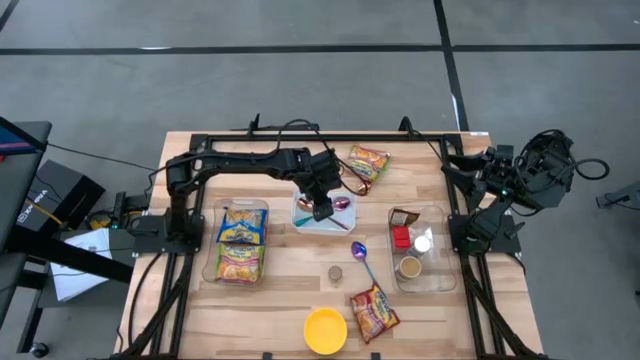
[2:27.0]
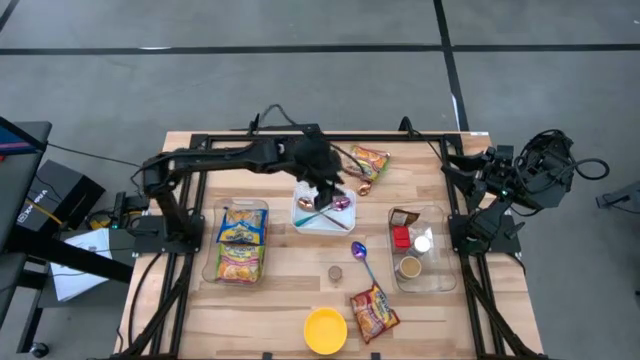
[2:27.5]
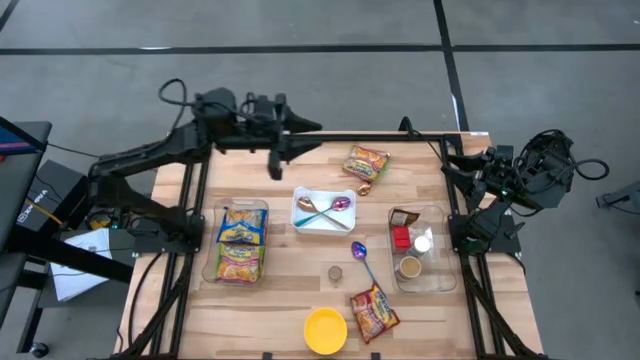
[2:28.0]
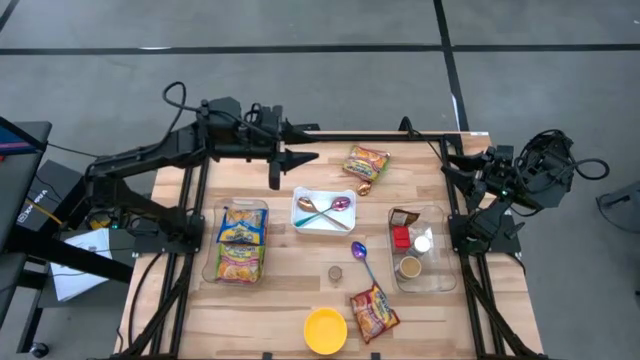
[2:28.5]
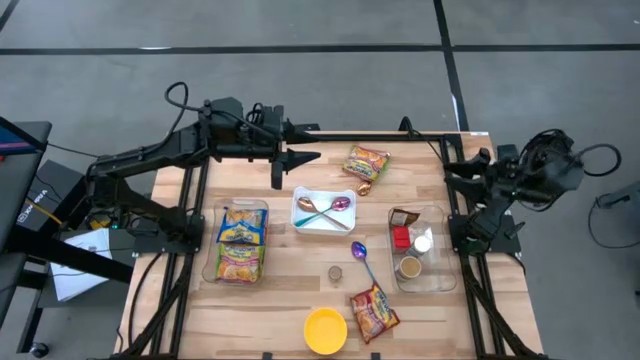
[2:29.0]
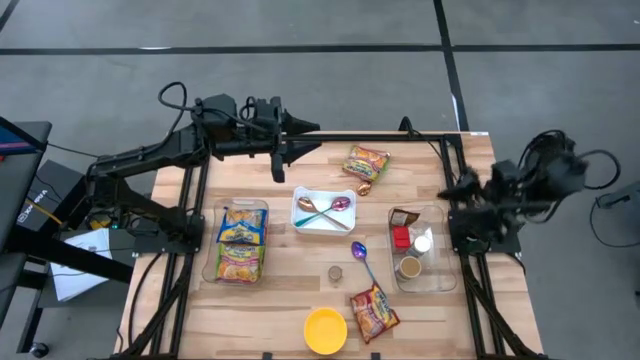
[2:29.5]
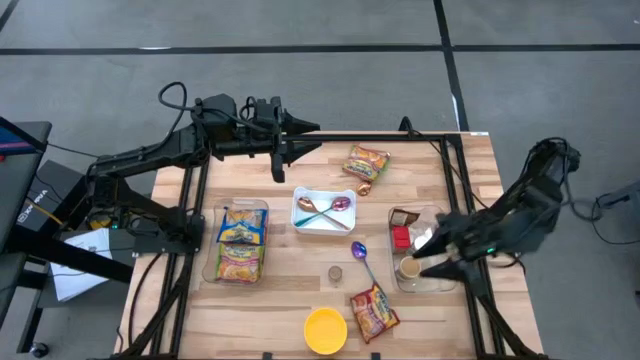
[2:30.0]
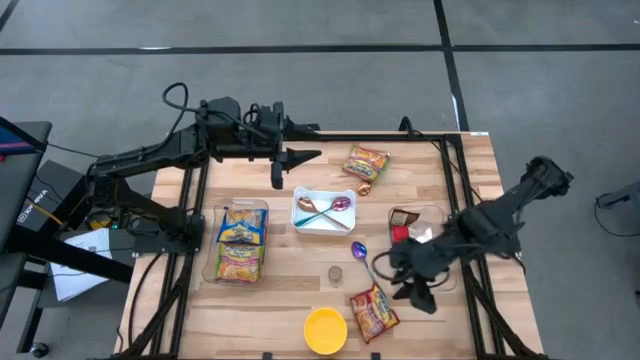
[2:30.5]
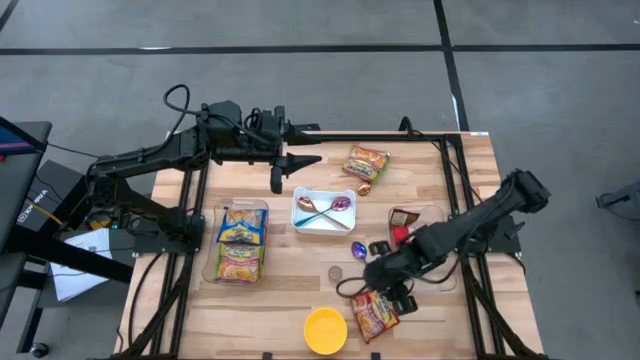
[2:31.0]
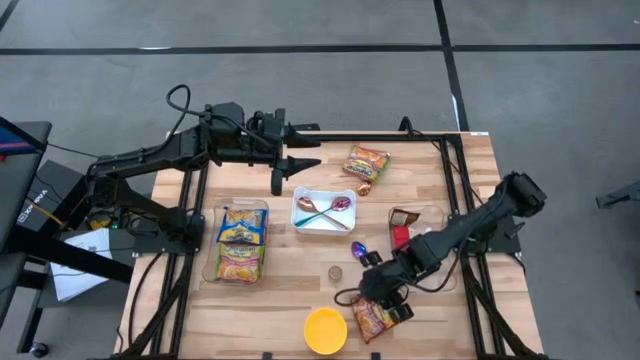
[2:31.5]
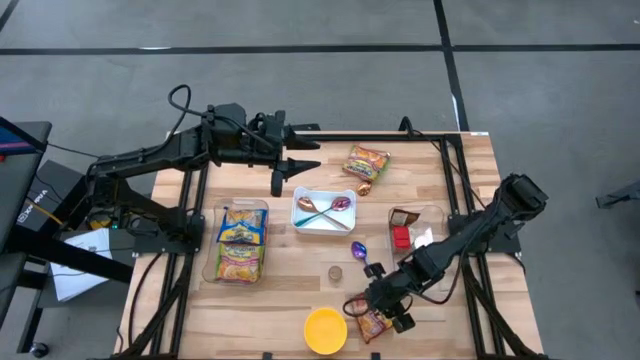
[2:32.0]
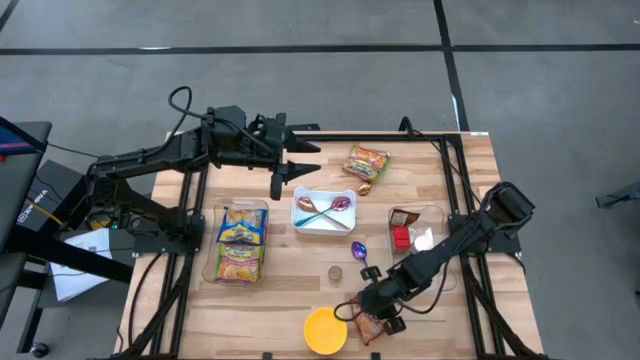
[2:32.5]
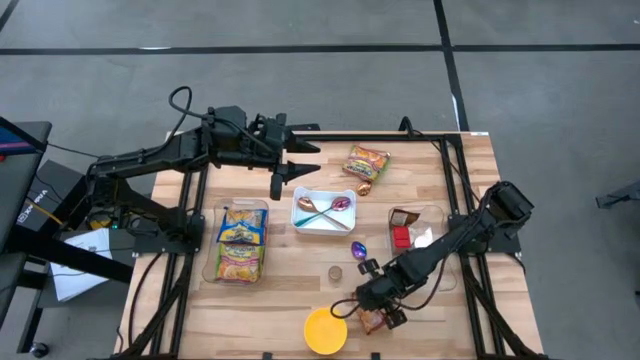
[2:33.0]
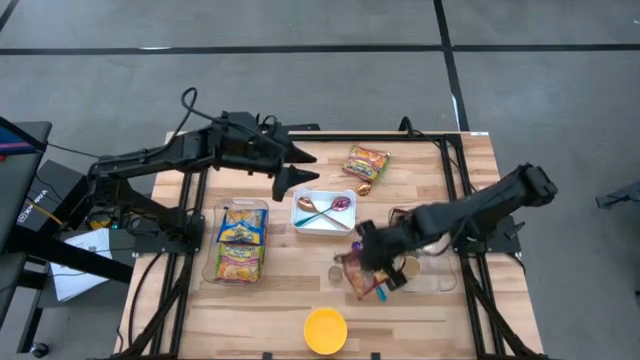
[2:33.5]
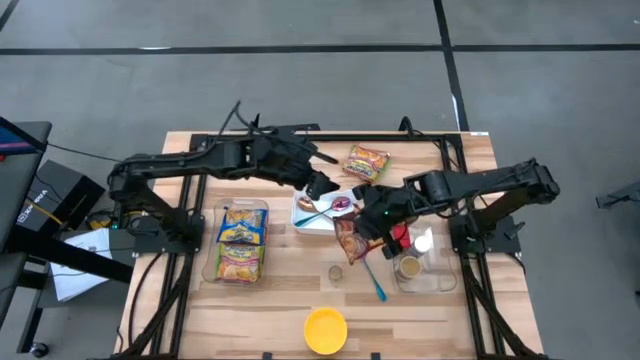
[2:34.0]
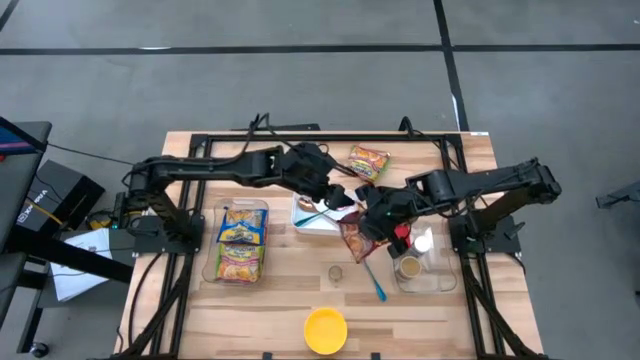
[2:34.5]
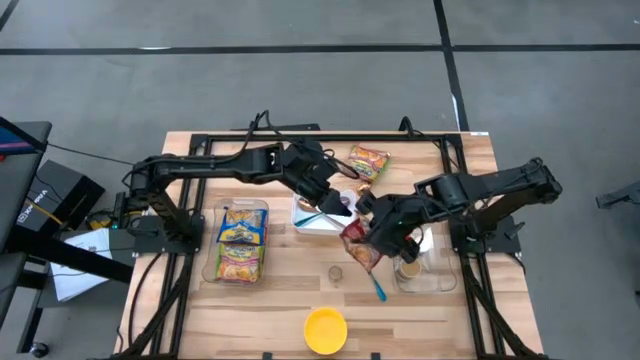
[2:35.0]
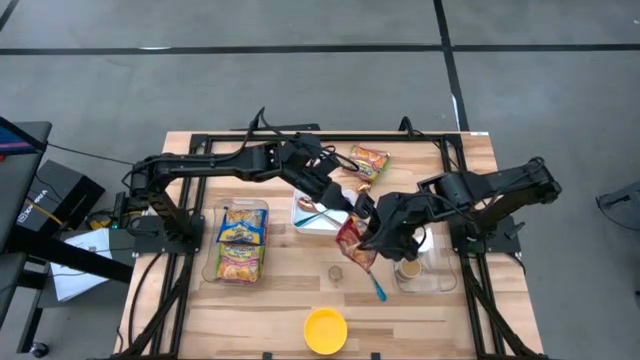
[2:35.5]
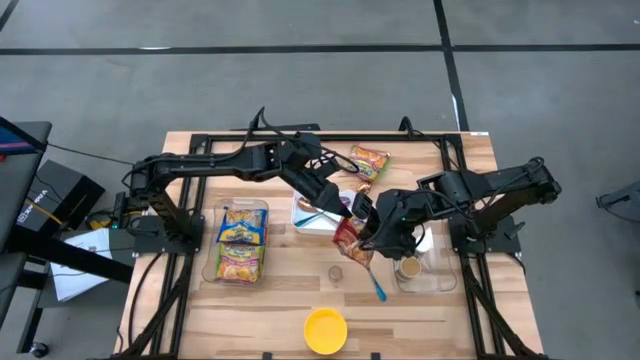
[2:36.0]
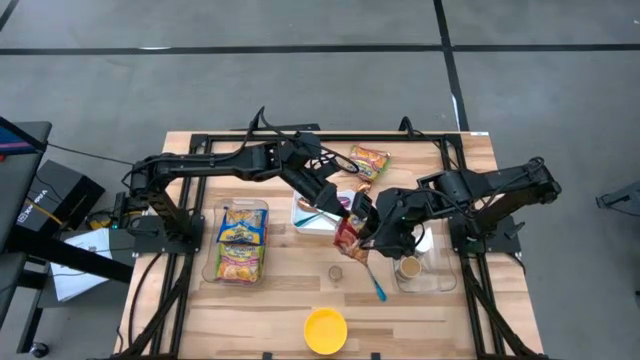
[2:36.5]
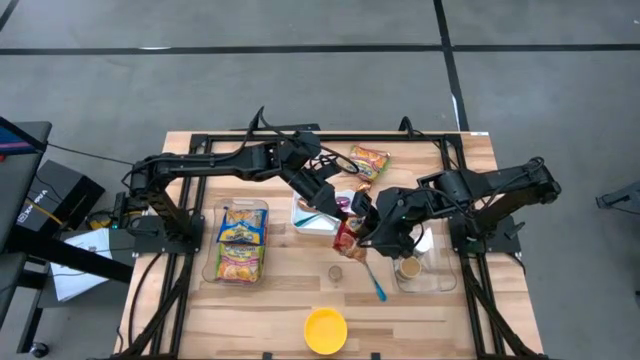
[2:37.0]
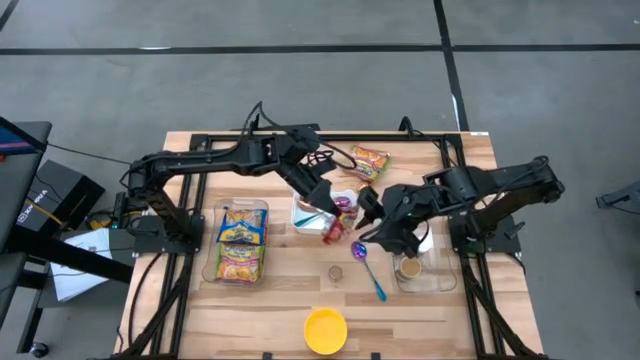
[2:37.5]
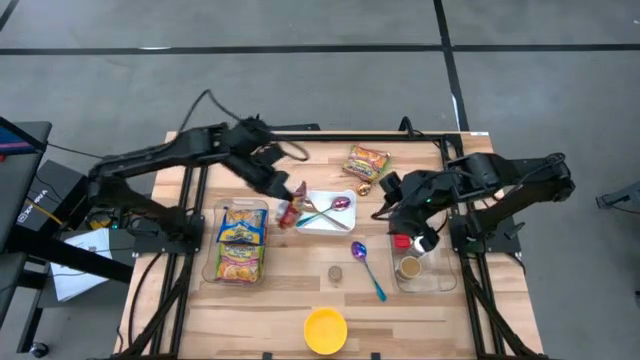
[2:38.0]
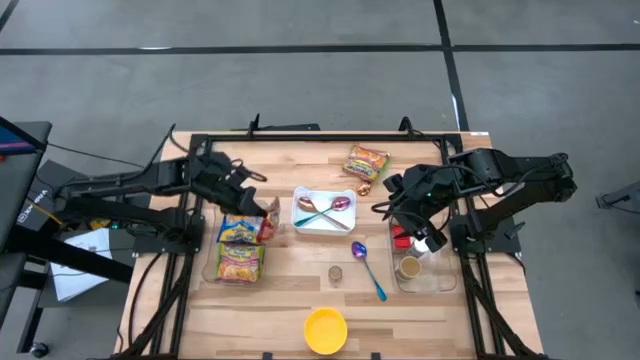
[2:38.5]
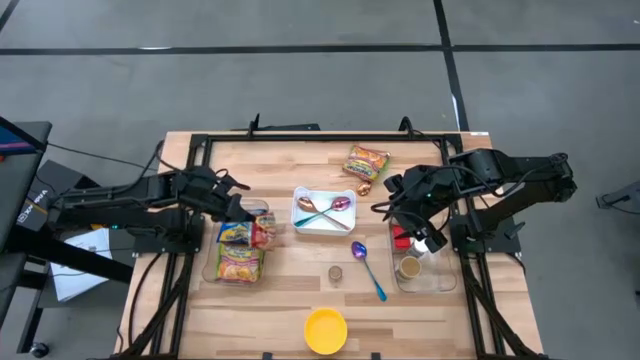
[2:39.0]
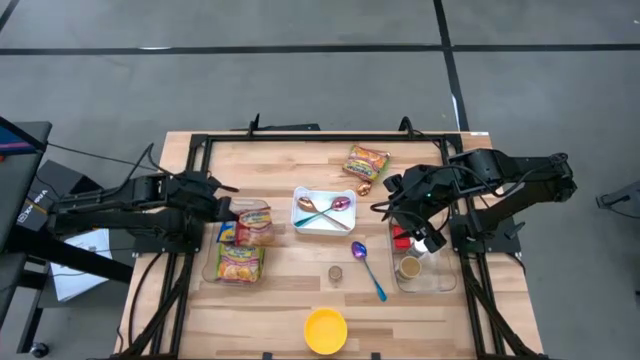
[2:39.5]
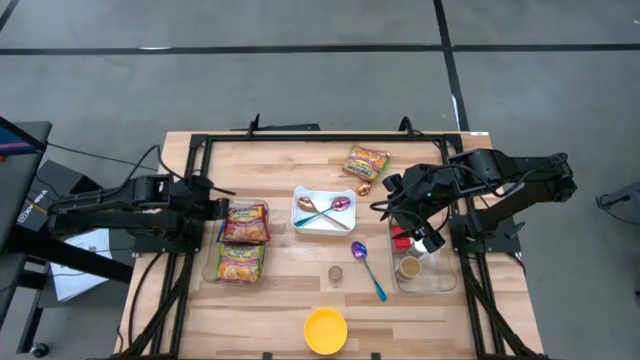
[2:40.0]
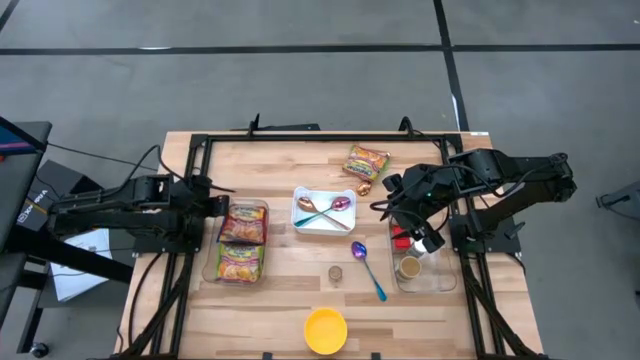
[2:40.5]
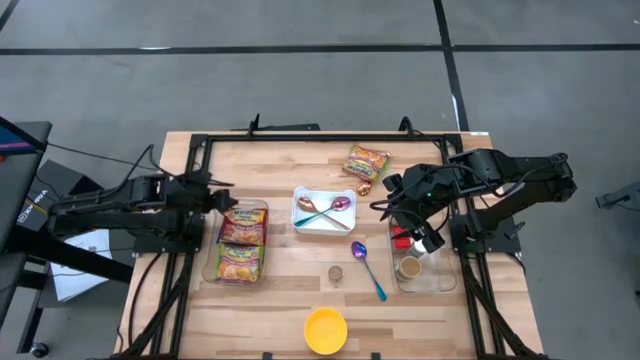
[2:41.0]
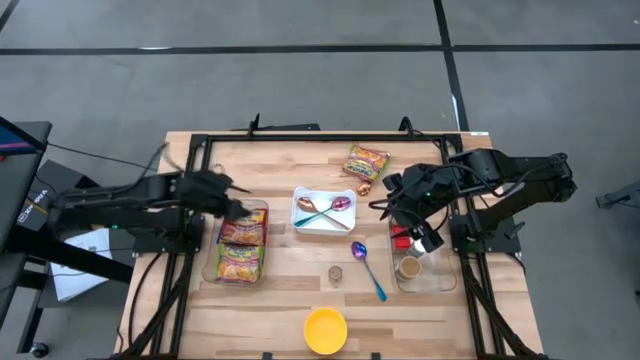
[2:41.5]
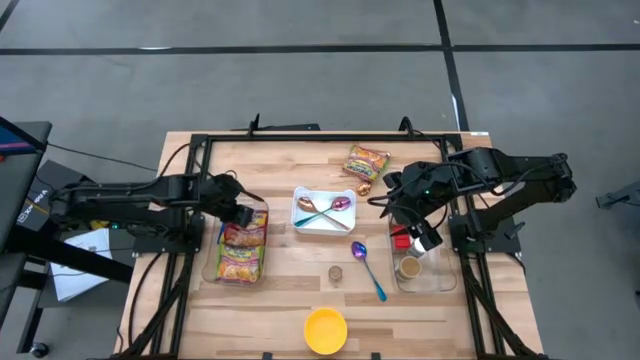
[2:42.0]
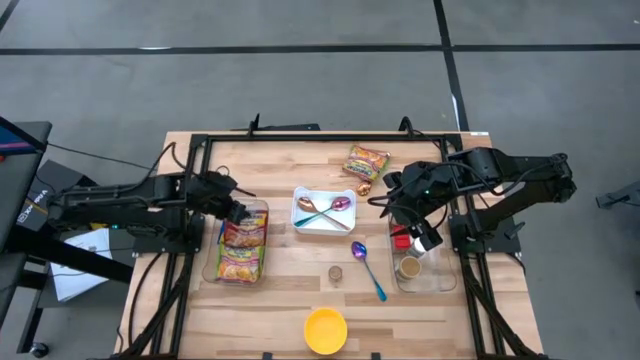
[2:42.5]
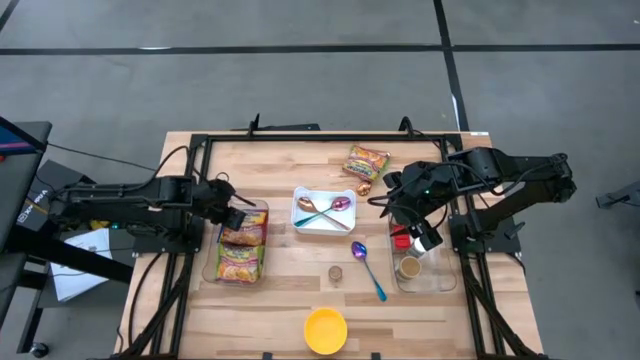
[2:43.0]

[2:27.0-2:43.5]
Task: Pick & Place Food Item
Put the red noodle pack into the left transparent bin

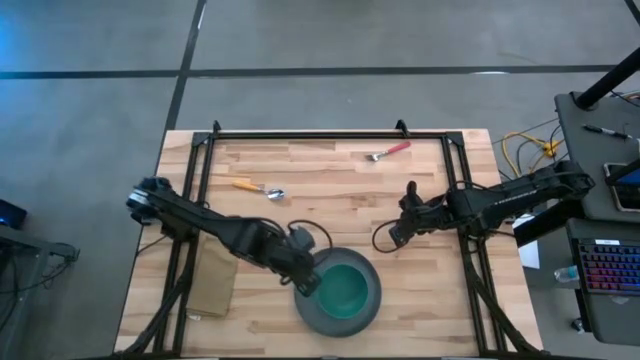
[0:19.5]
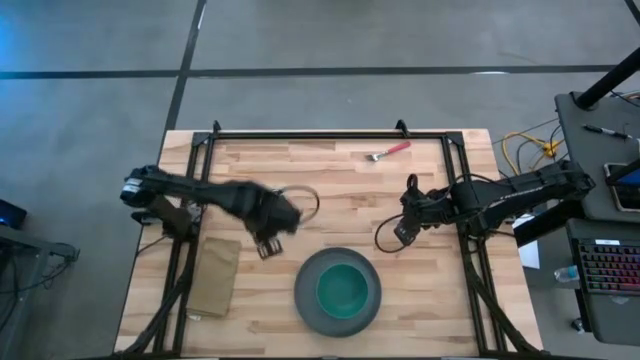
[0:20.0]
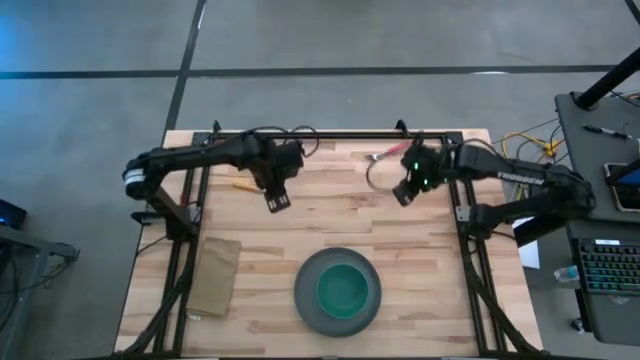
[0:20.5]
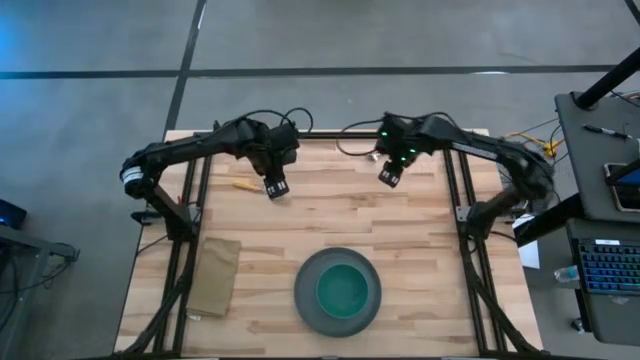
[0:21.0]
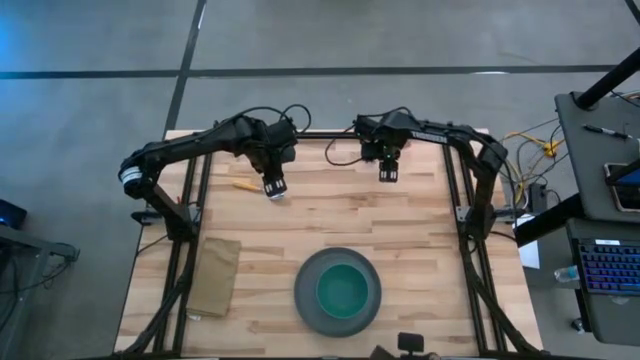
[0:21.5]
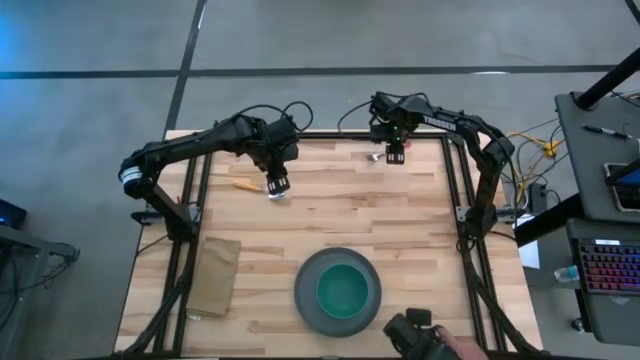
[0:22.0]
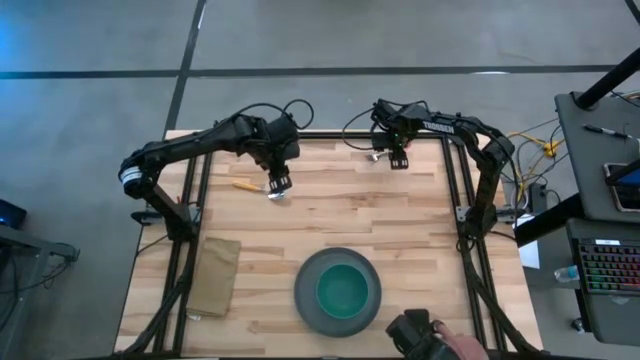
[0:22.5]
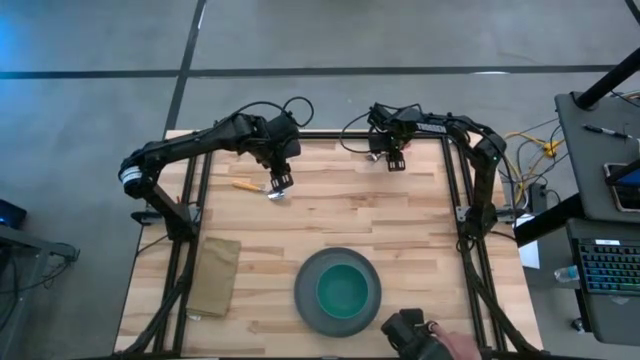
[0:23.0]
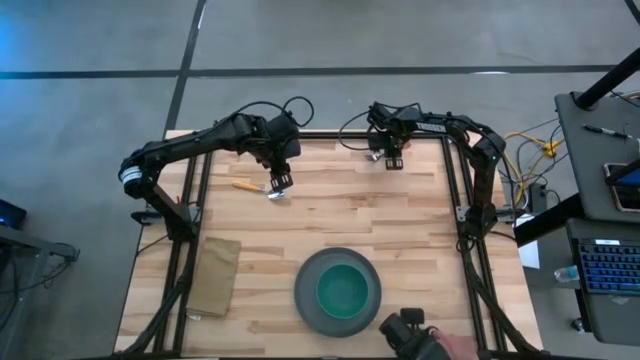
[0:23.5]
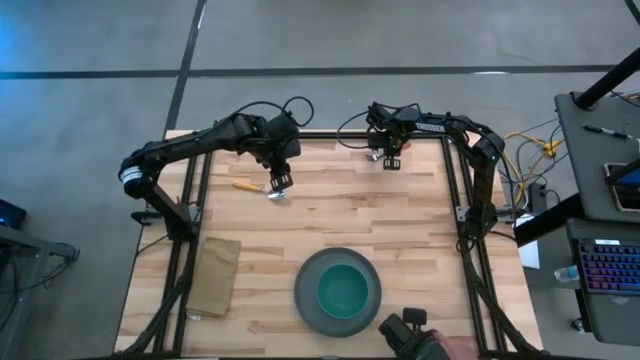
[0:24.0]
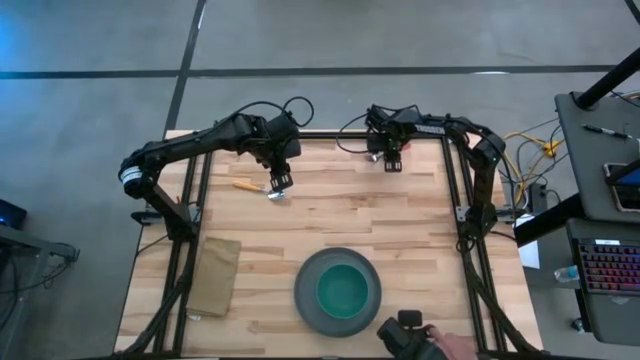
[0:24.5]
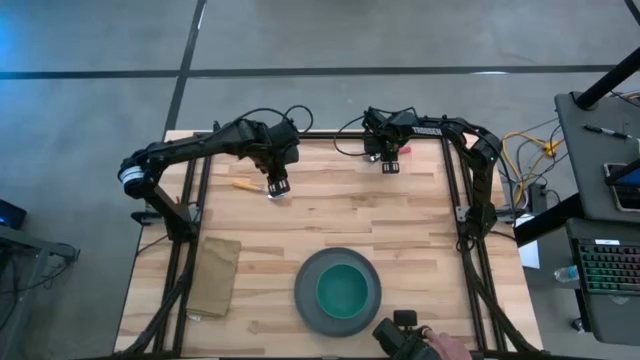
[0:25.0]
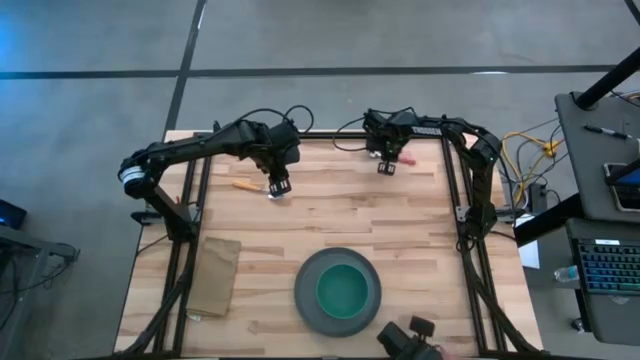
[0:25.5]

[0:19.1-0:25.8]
Task: Set table place
Put the fork to the right side of the plate
